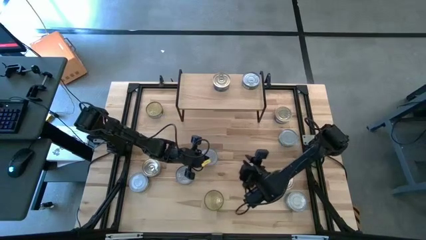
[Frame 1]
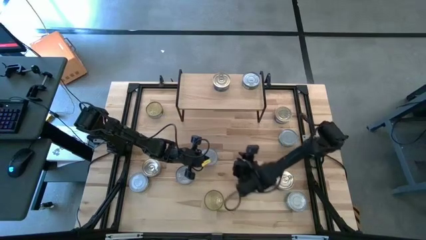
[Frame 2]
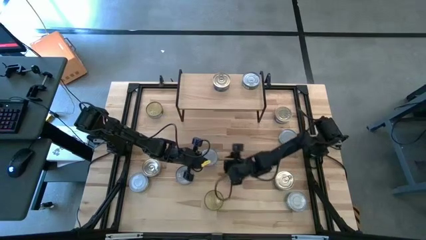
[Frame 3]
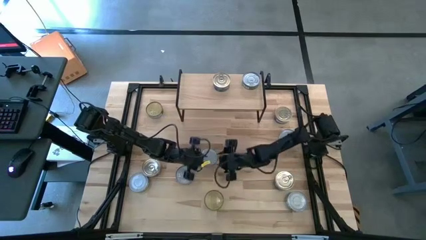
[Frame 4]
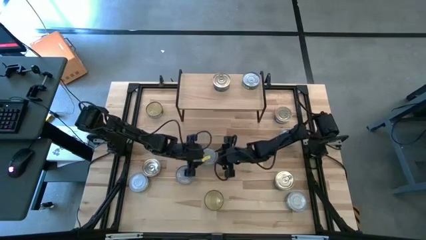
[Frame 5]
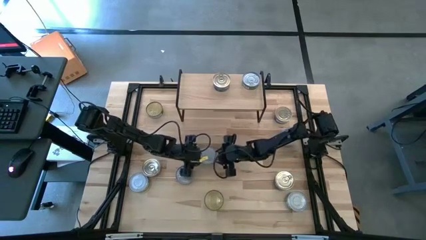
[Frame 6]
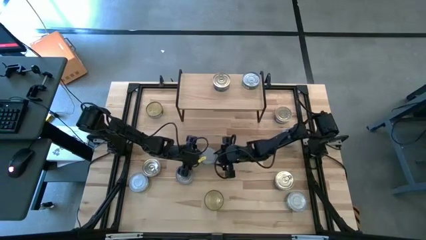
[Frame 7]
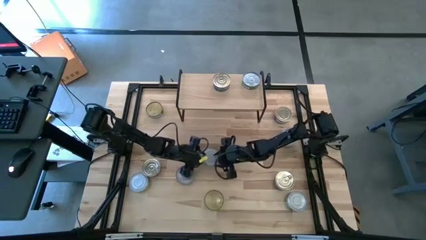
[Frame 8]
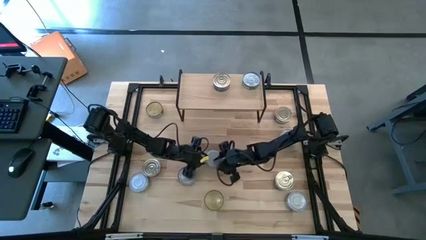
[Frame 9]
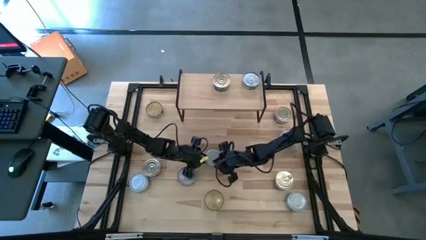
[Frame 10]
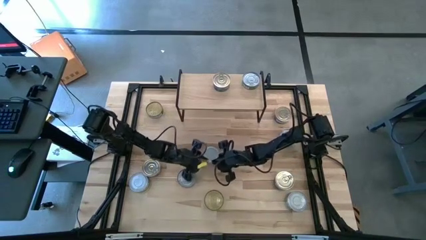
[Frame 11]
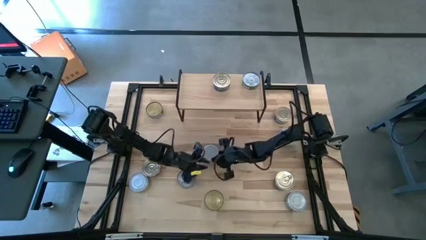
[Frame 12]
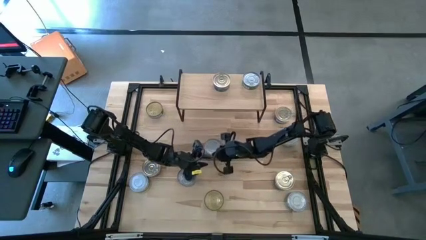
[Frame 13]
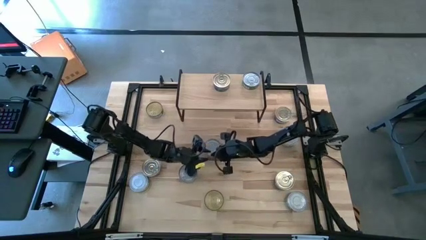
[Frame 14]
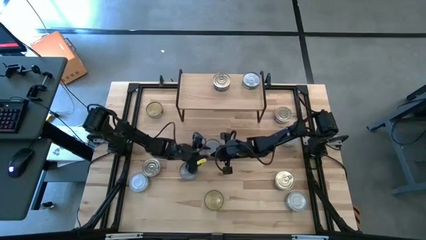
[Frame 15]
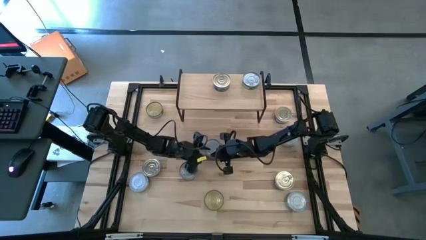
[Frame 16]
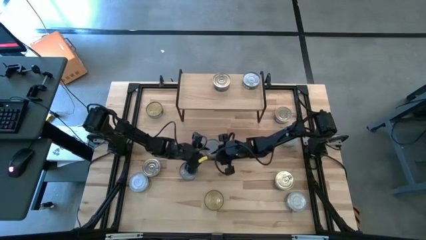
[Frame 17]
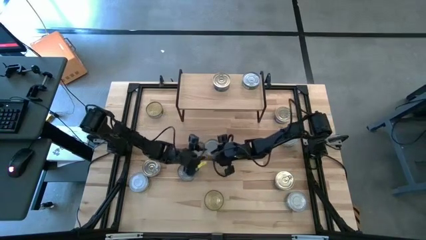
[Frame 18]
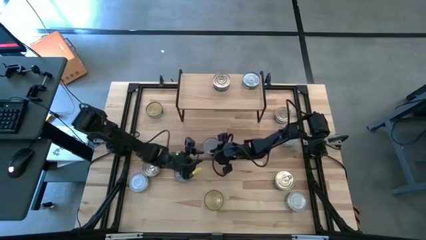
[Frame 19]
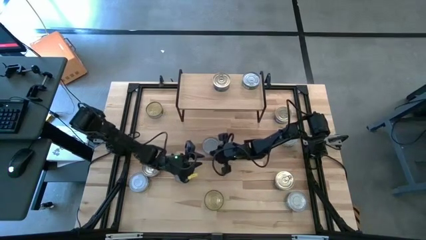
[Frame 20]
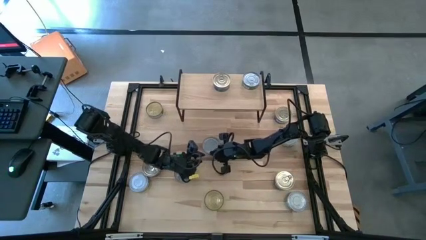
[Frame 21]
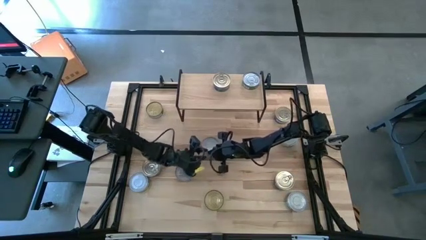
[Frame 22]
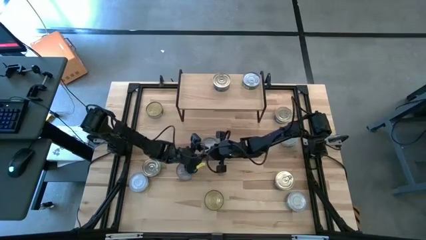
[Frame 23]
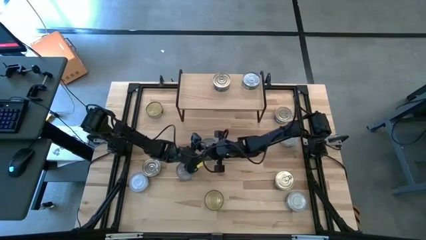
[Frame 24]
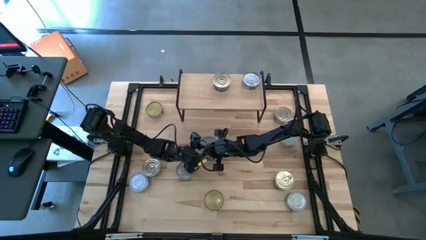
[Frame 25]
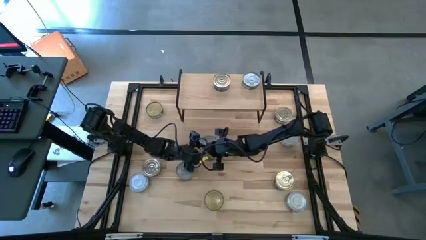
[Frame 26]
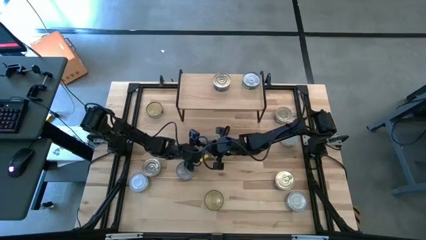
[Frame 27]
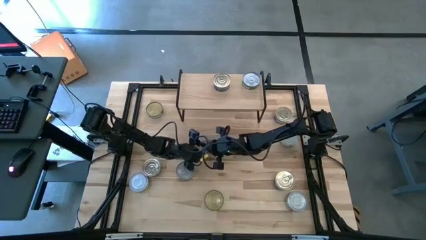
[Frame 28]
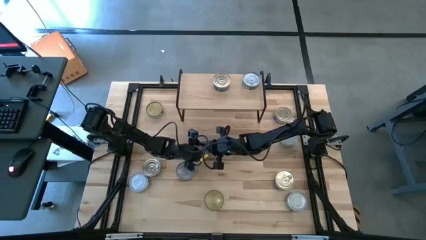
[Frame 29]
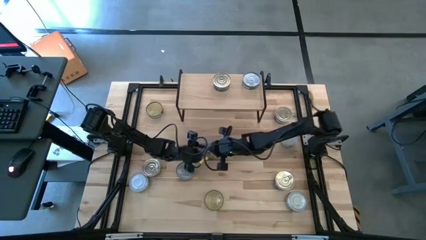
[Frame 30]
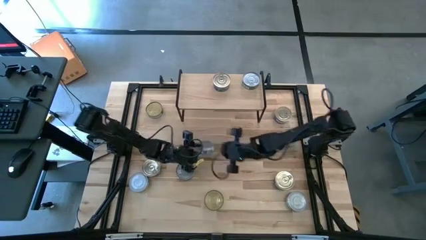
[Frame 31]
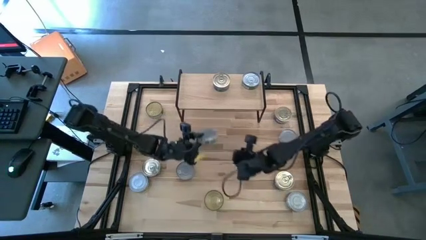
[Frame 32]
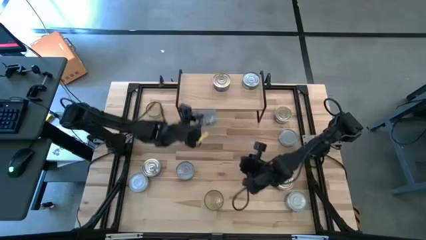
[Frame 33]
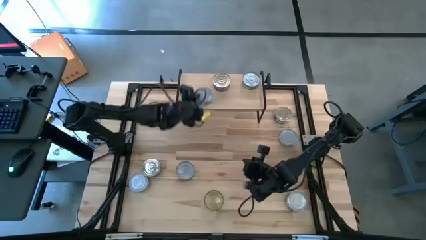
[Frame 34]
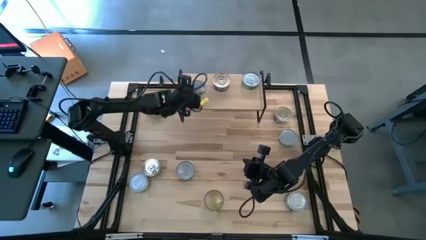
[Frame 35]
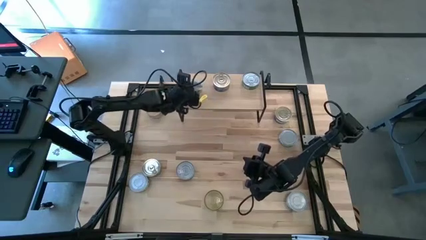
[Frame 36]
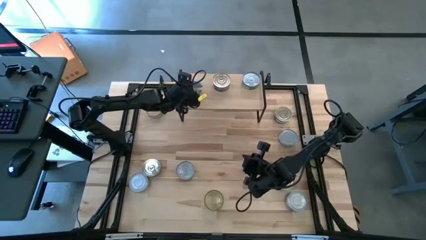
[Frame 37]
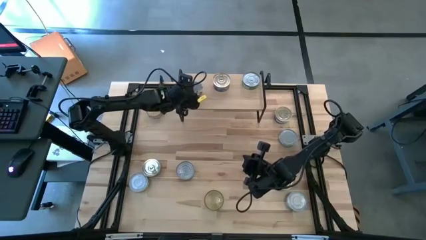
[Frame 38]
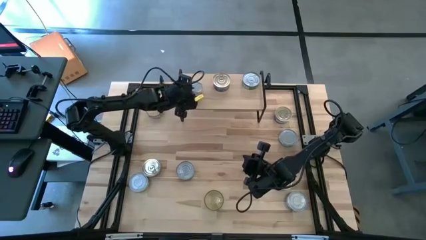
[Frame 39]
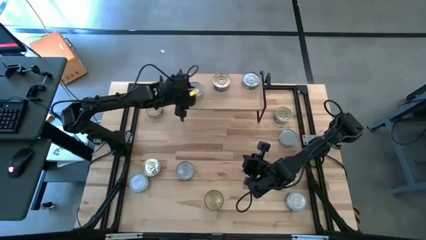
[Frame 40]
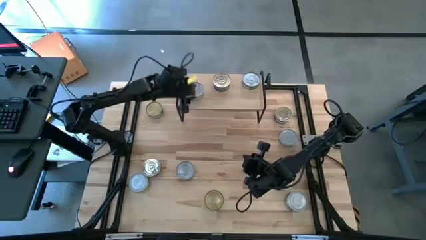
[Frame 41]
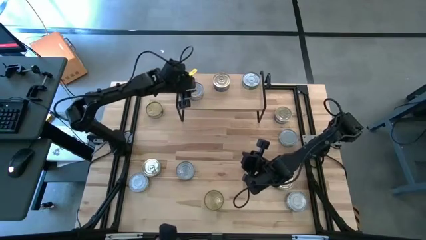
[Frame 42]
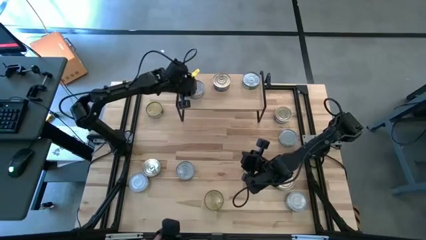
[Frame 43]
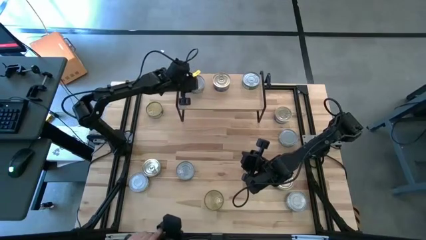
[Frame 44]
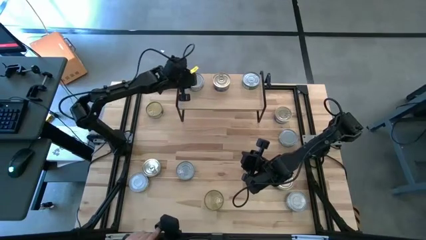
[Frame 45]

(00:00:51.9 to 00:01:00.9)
Task: Stack canned seafood by type on shelf
Put the green white tuna can on the shelf

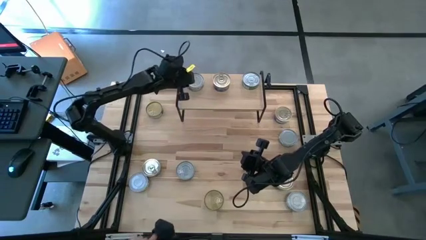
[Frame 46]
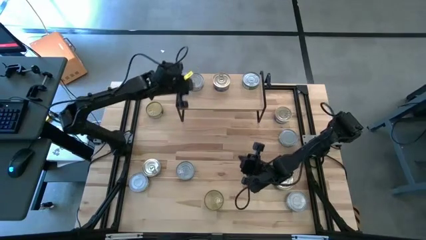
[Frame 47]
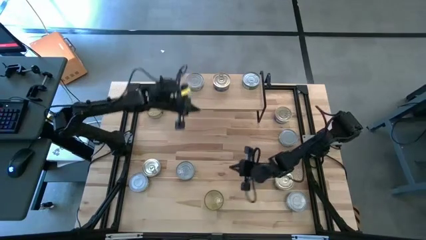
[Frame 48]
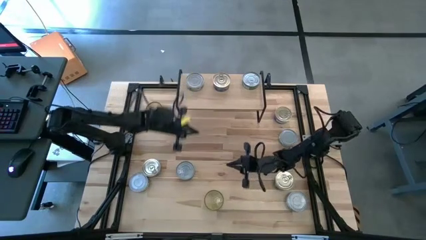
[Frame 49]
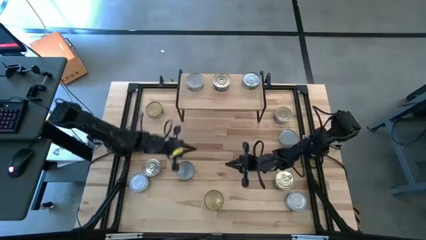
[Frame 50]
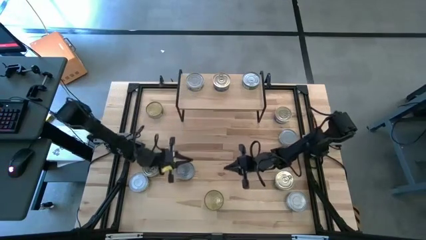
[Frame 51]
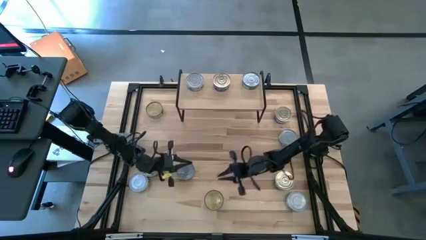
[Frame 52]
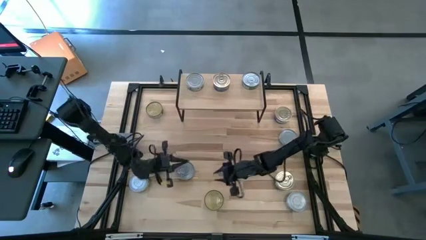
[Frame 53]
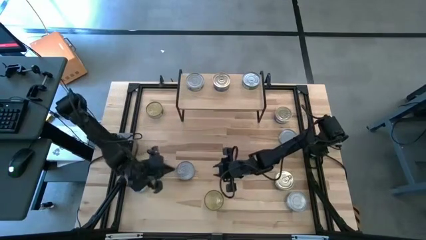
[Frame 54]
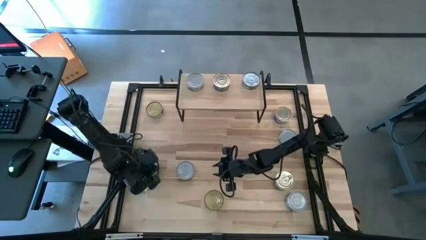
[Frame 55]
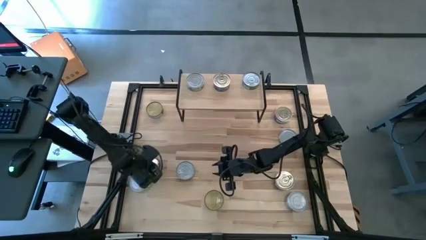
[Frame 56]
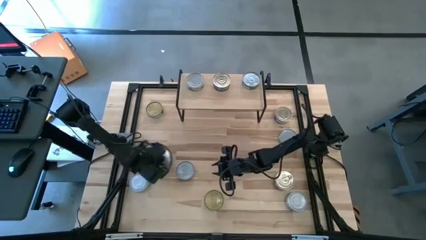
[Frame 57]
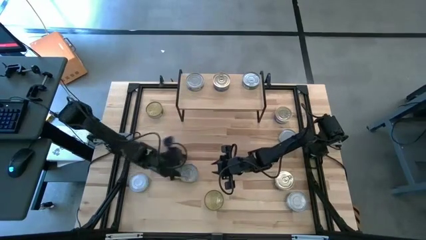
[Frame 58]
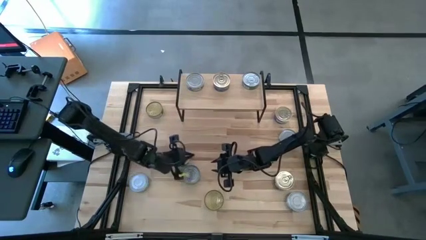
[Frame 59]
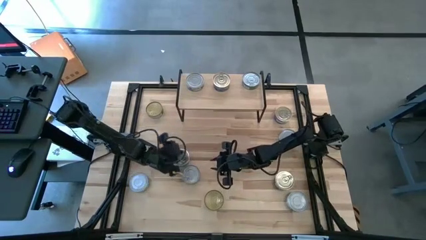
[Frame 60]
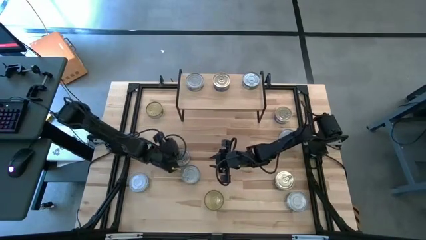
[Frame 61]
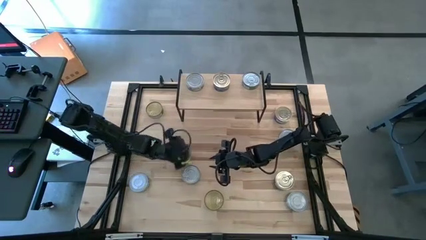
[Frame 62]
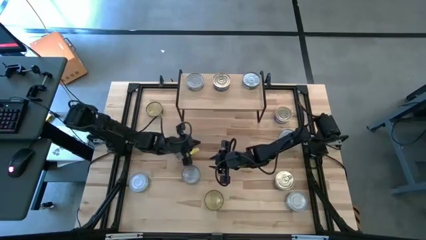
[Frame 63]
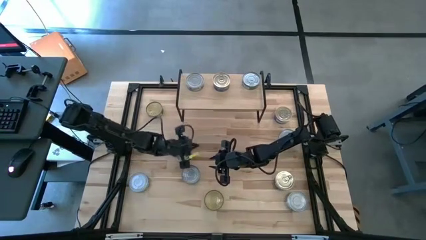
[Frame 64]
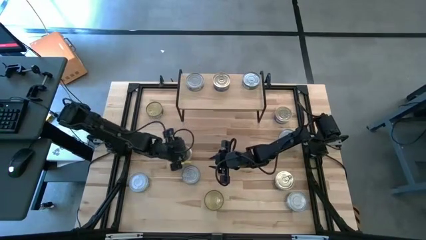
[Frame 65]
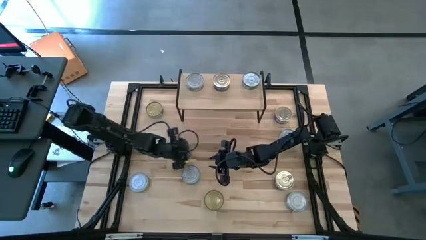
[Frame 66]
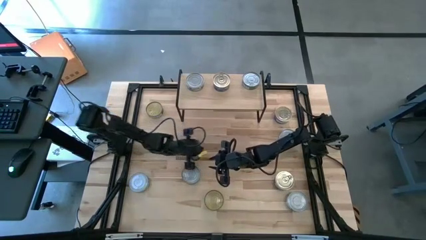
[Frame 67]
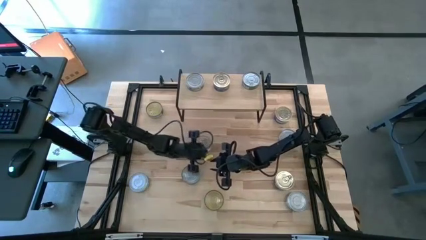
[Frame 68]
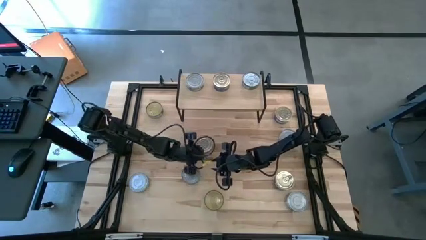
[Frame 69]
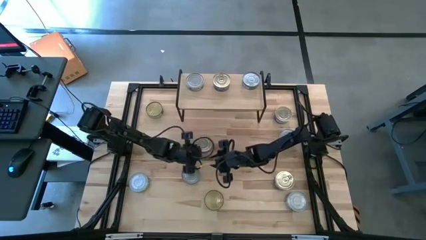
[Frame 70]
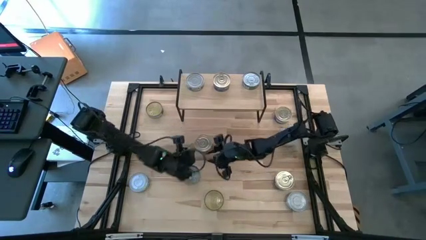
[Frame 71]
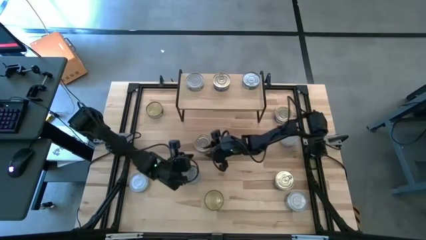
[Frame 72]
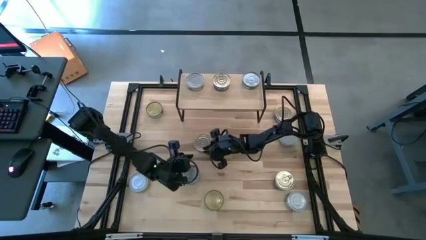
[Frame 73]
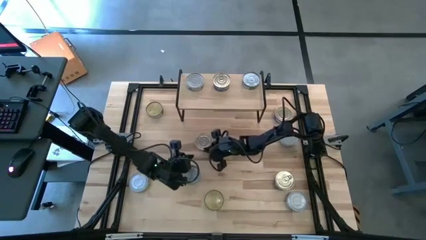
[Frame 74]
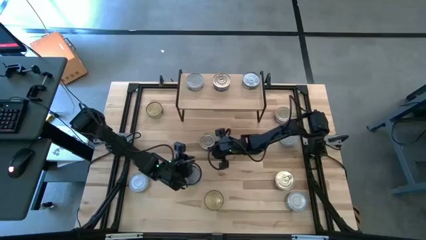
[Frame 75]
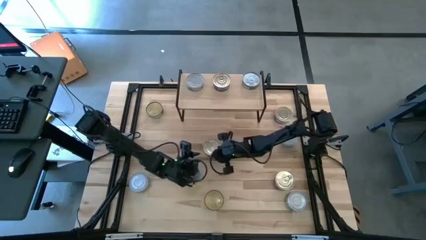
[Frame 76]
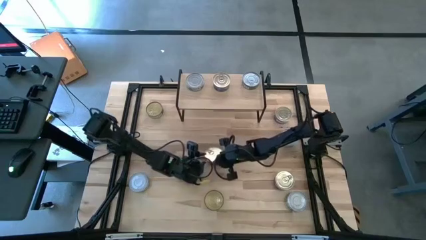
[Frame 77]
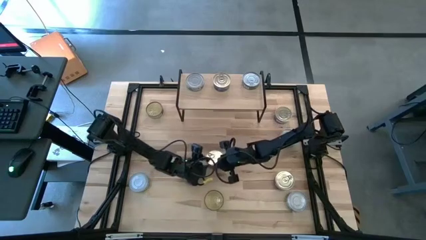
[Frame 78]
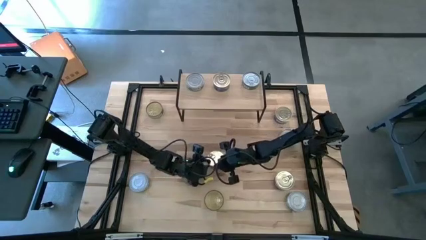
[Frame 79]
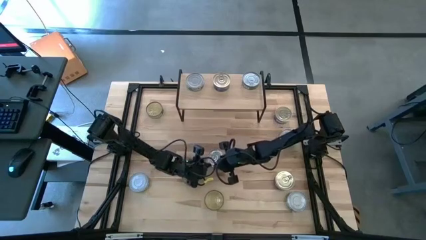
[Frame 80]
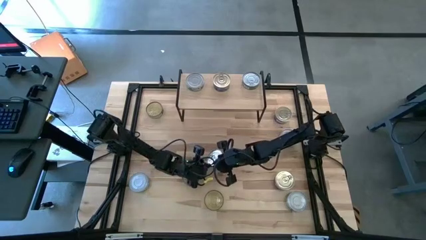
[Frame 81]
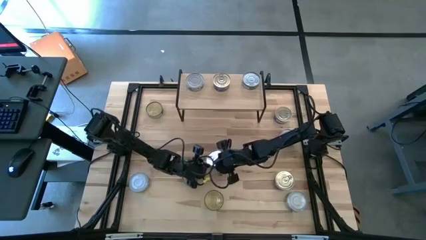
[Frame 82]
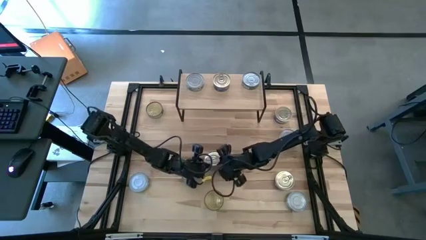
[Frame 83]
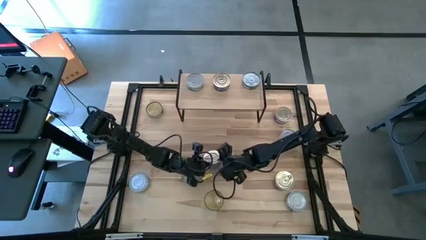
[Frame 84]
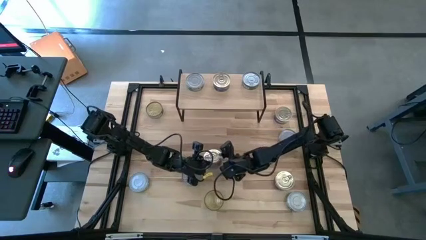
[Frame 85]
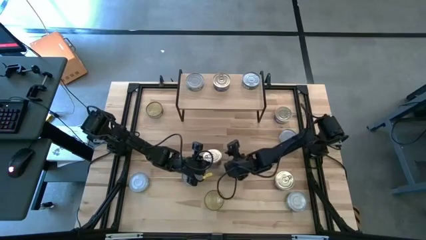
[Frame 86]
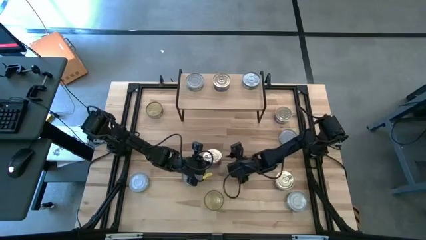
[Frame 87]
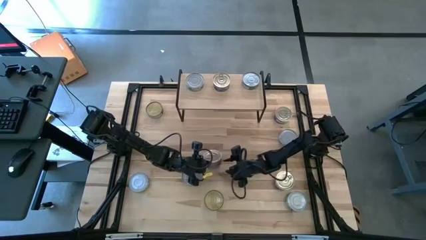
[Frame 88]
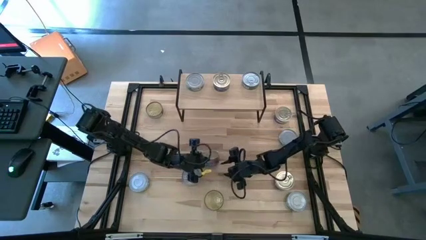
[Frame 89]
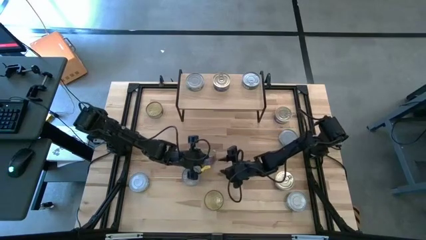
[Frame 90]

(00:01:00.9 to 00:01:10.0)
Put the blue tuna can on the shelf
